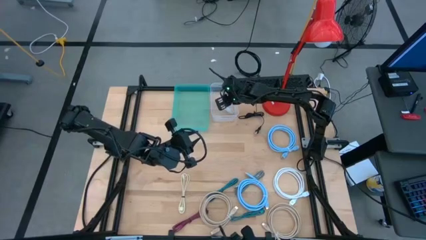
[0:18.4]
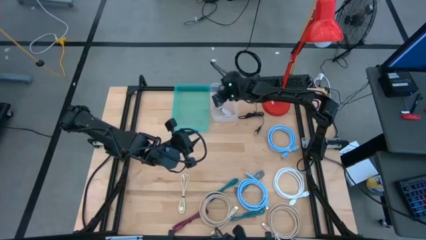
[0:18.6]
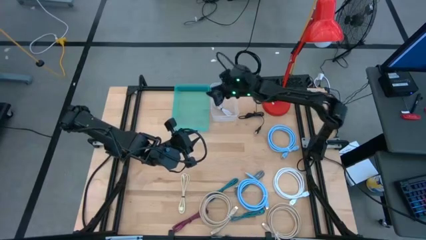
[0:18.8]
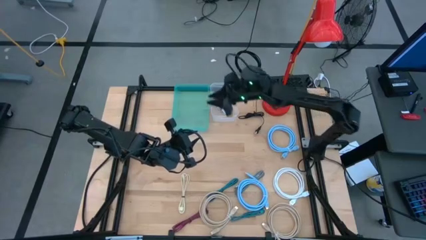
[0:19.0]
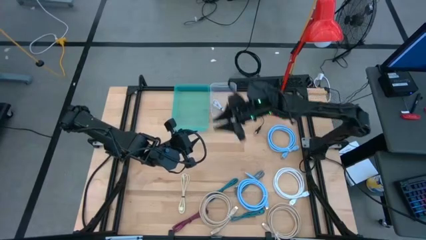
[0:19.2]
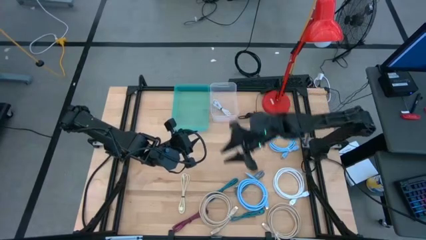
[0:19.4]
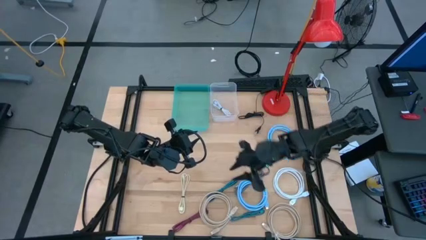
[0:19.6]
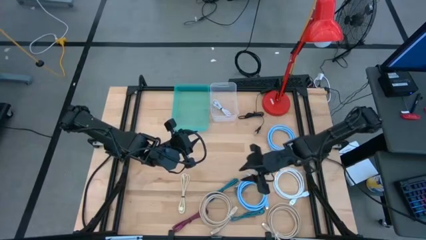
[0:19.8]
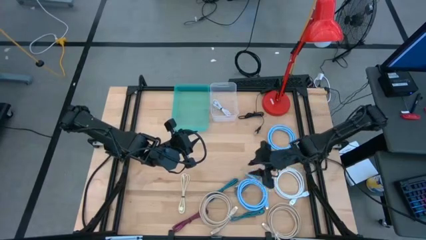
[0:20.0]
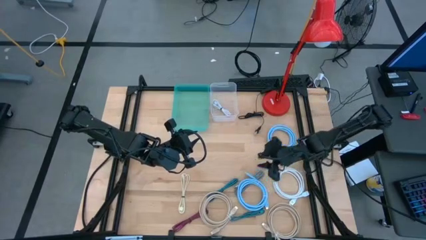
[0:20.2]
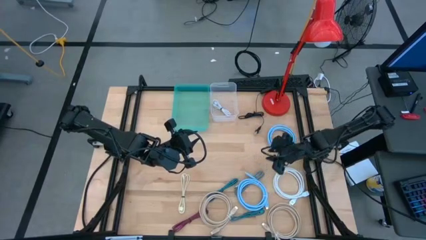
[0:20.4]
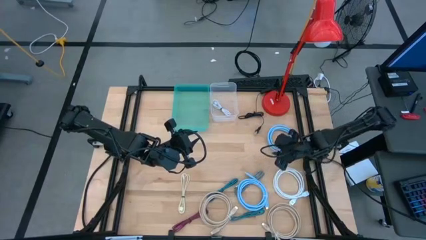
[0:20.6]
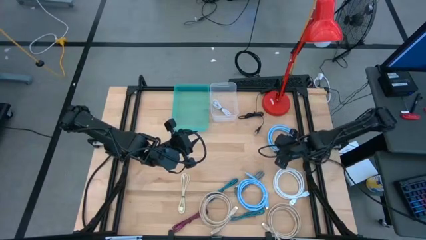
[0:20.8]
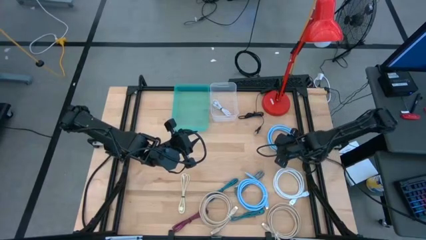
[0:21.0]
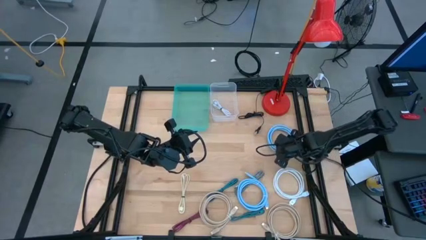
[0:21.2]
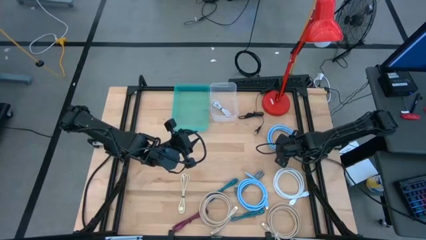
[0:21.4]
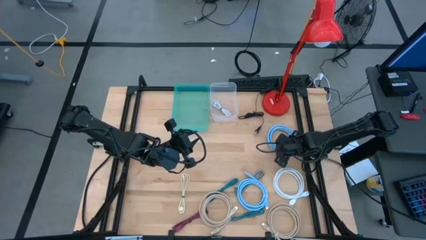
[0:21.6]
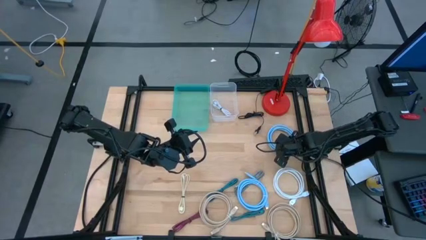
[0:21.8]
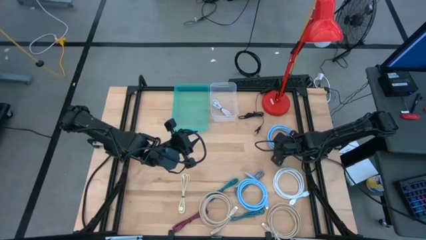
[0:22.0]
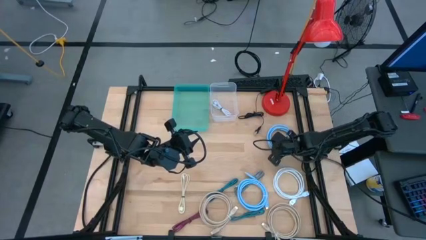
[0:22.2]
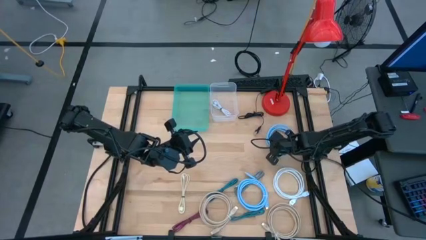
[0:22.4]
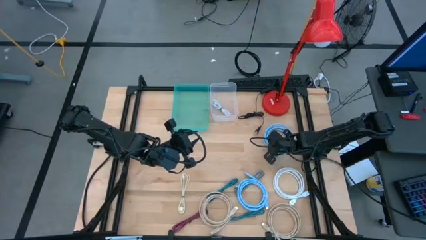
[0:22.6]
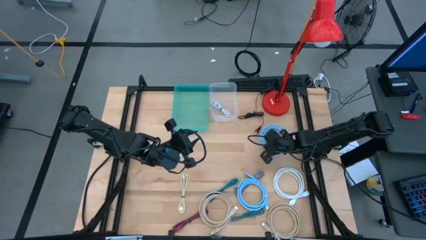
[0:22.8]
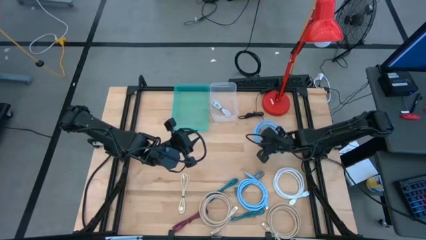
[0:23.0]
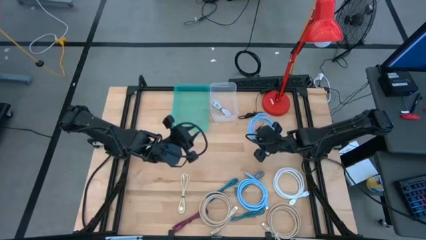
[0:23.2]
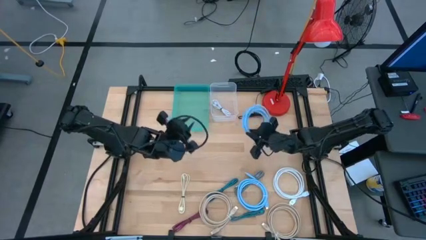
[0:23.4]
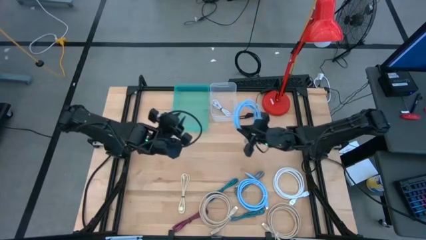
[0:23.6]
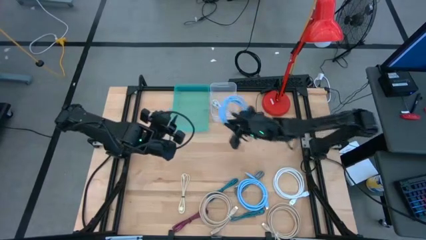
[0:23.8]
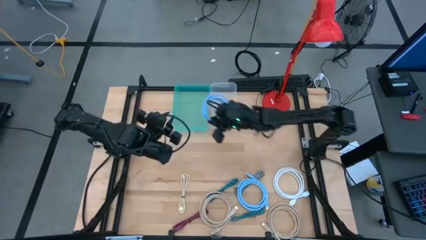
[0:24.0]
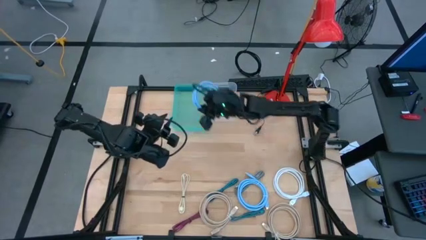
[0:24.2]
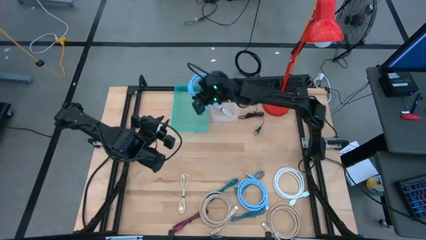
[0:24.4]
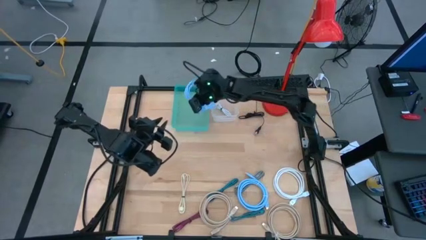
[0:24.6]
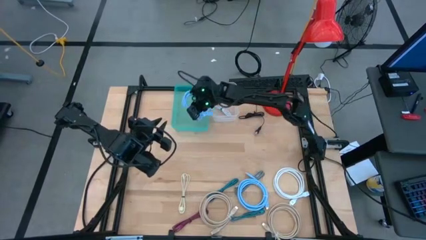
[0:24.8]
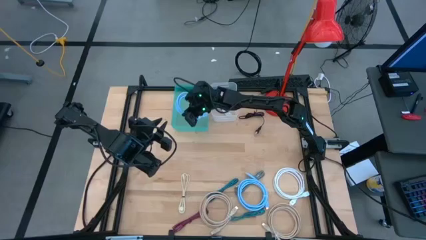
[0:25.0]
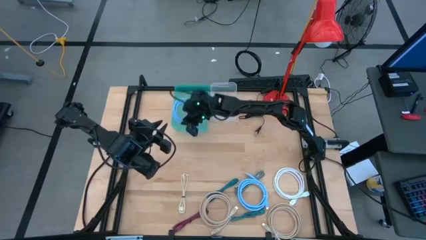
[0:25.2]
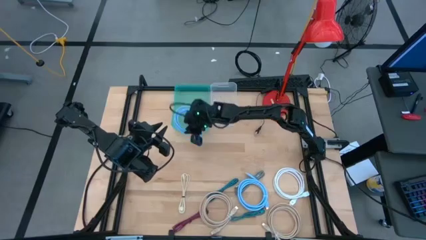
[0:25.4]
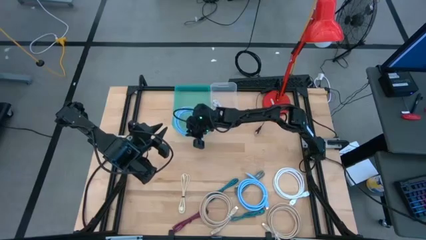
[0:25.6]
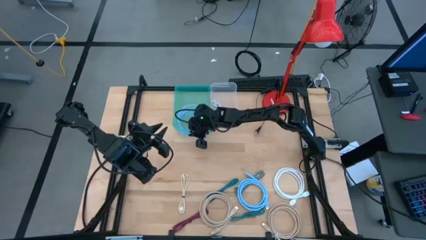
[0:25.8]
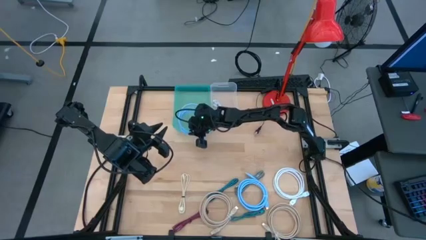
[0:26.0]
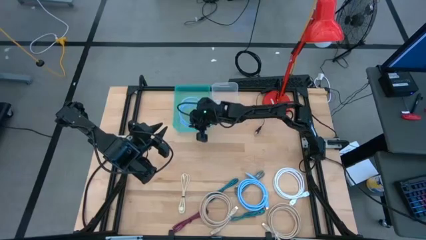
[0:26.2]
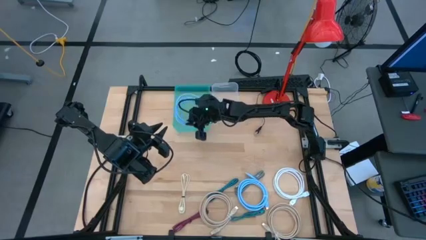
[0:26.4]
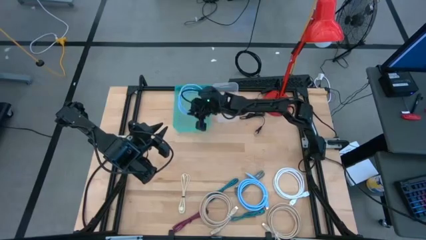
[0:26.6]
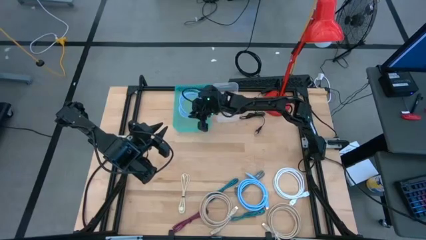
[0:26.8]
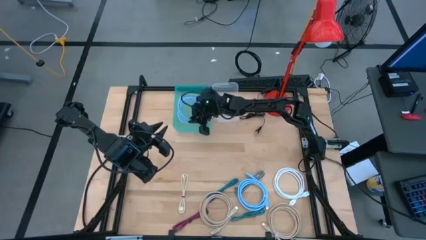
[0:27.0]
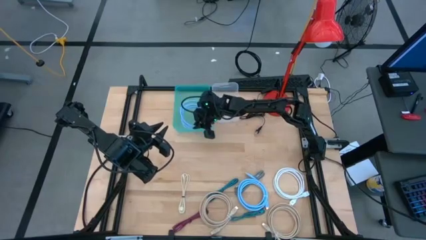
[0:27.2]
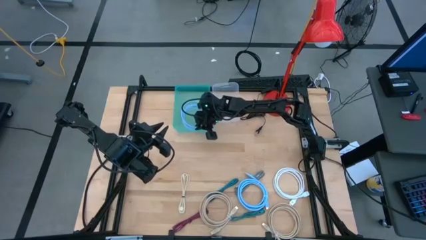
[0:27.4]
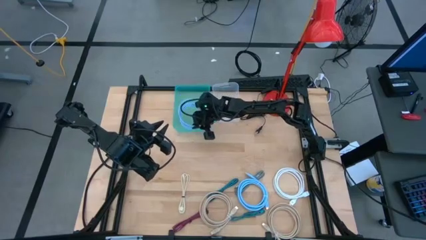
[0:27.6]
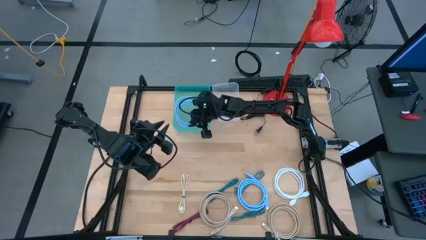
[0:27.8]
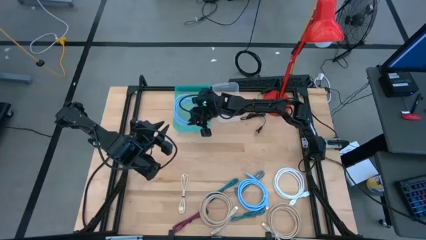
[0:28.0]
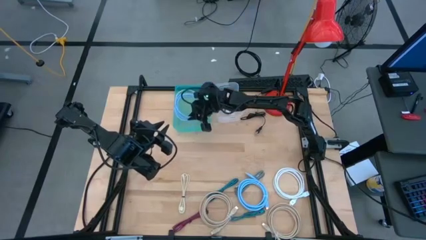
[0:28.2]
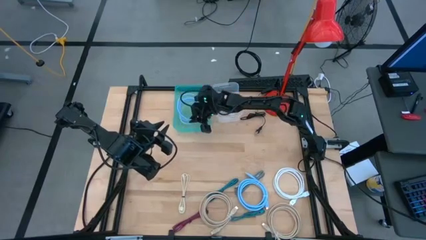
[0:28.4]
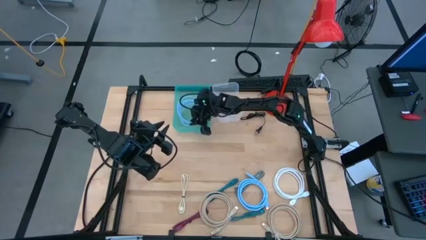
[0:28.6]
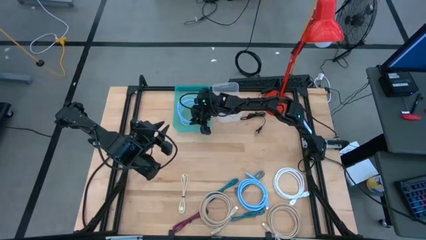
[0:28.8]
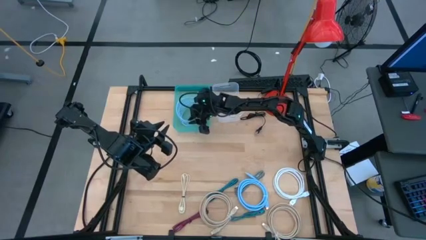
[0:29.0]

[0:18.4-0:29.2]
Task: Pick and place items into bin
Put the top blue HDMI cable into the green bin

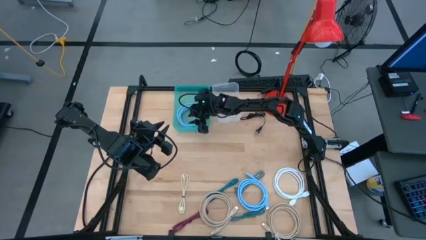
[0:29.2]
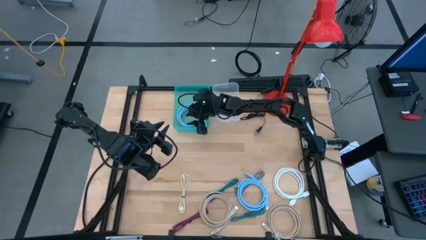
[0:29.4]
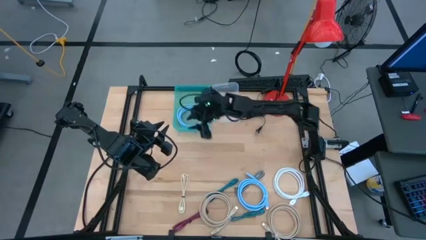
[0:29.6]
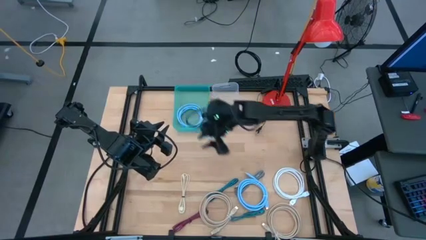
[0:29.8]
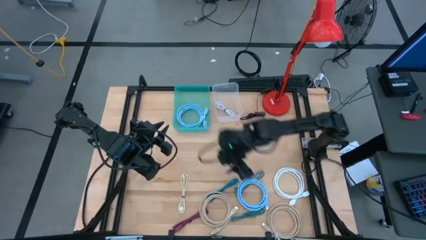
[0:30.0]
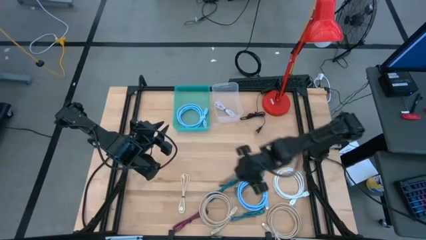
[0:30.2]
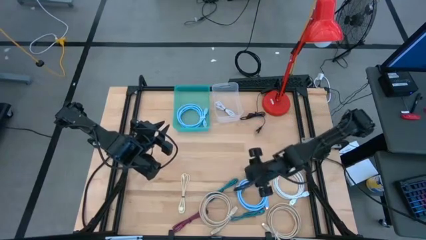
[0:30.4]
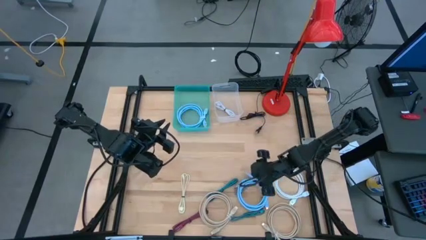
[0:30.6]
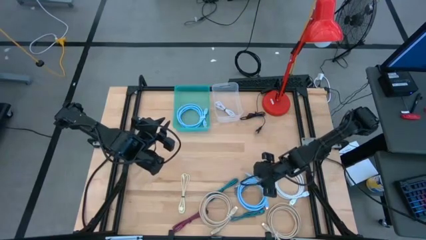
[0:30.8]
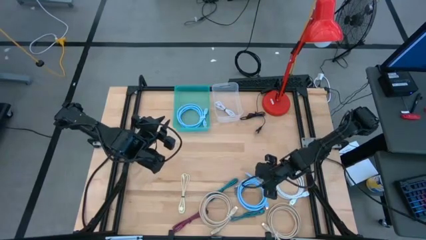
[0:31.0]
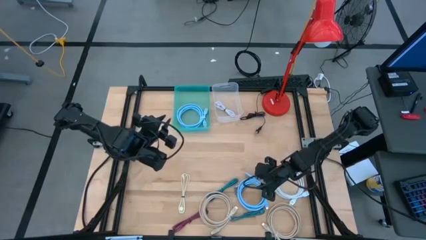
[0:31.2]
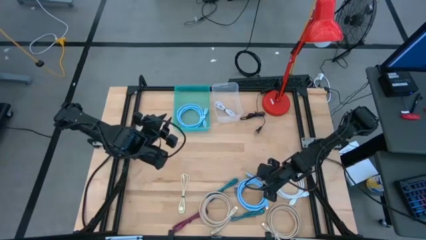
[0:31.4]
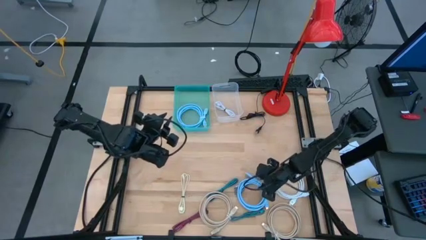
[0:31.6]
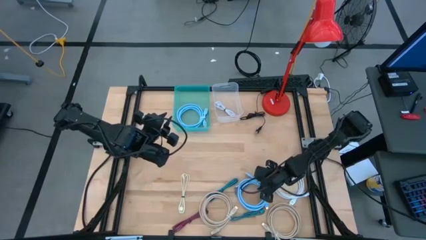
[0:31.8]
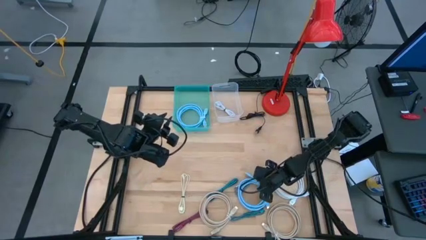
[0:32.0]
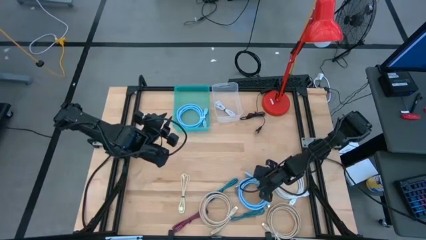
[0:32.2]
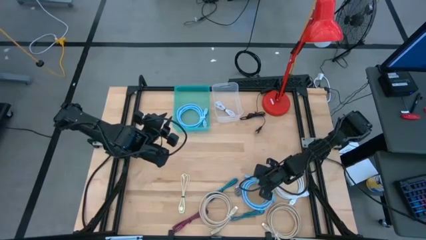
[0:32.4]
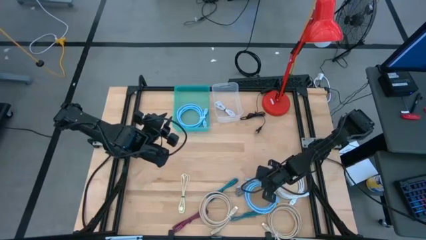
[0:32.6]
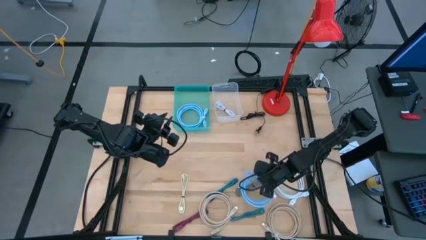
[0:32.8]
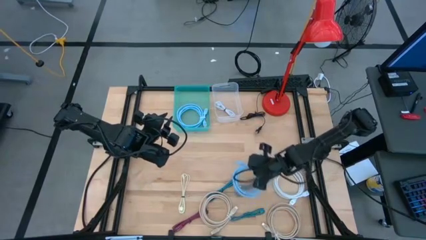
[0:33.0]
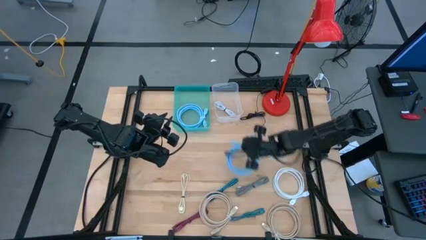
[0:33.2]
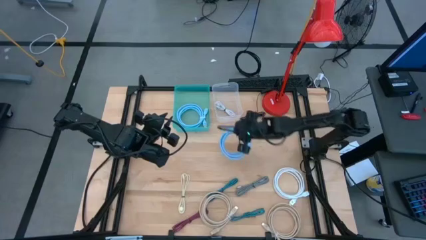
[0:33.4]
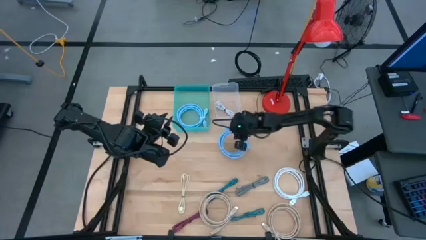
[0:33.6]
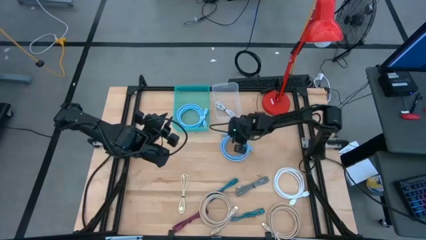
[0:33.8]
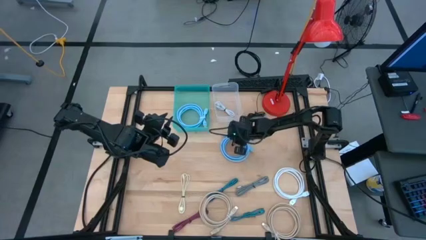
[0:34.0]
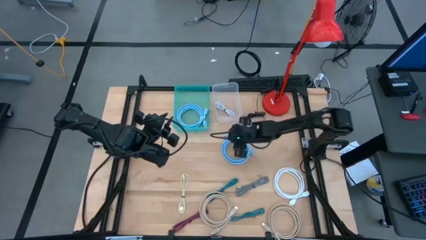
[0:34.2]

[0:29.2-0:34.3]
Move the blue HDMI cable to the center of the table
